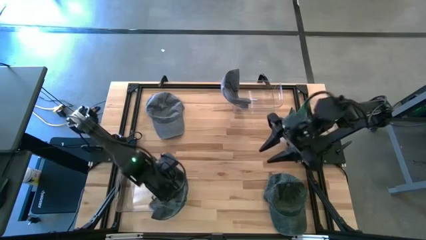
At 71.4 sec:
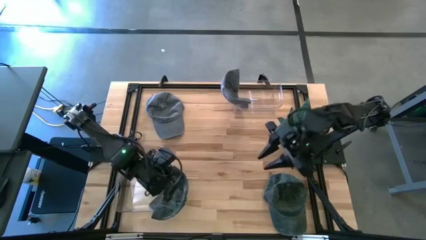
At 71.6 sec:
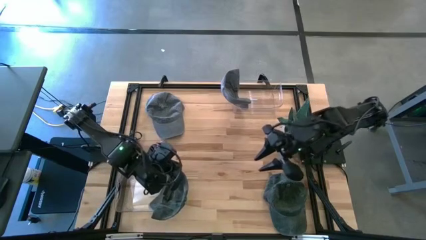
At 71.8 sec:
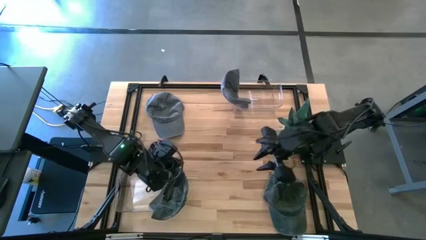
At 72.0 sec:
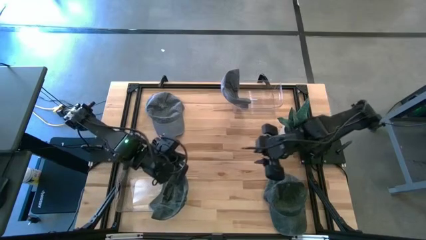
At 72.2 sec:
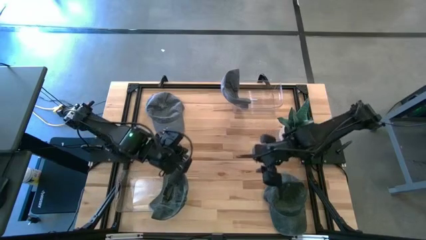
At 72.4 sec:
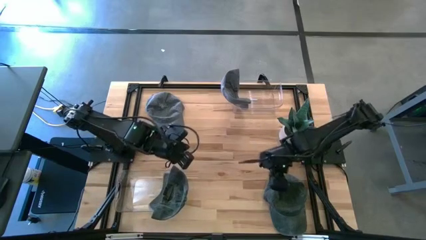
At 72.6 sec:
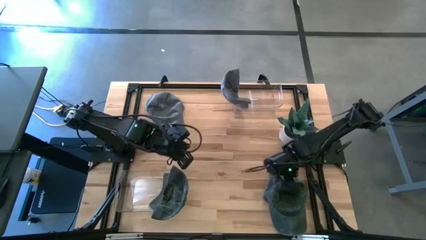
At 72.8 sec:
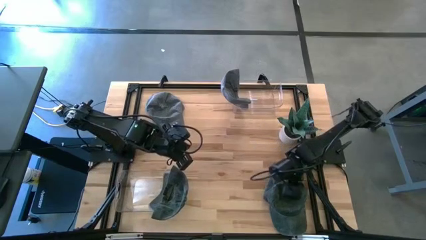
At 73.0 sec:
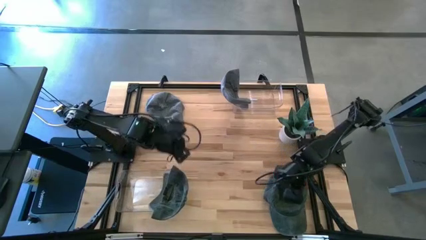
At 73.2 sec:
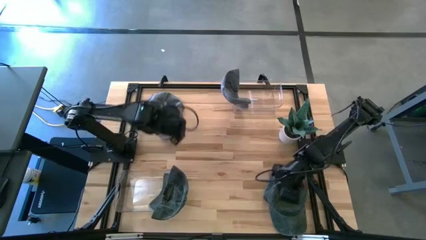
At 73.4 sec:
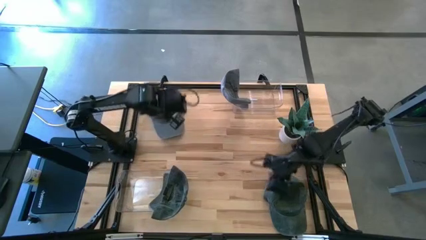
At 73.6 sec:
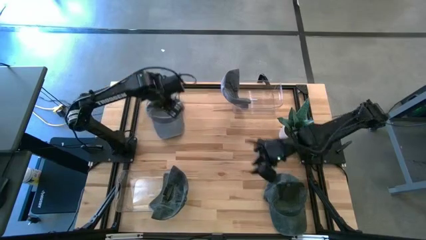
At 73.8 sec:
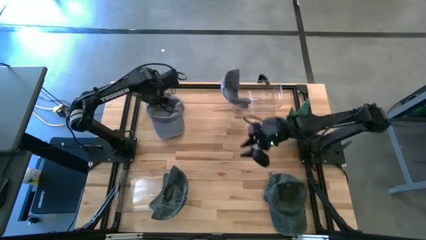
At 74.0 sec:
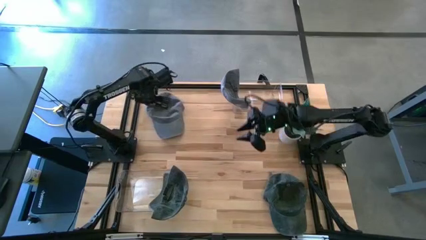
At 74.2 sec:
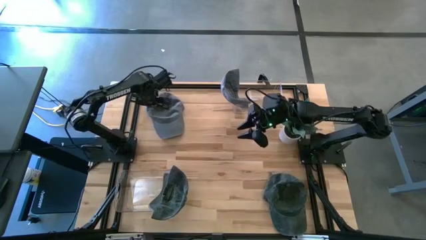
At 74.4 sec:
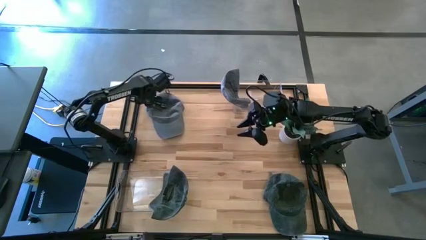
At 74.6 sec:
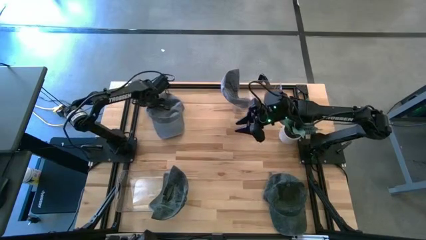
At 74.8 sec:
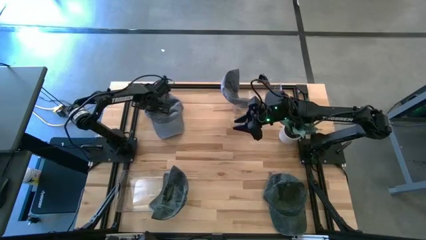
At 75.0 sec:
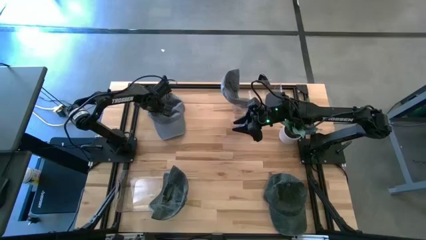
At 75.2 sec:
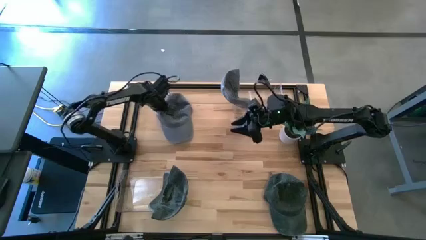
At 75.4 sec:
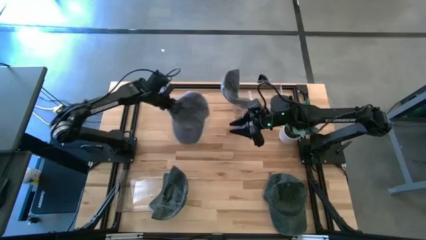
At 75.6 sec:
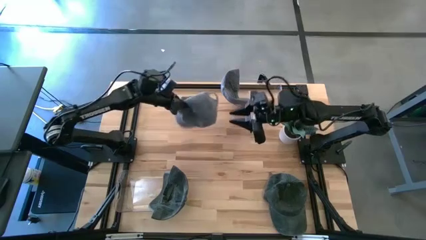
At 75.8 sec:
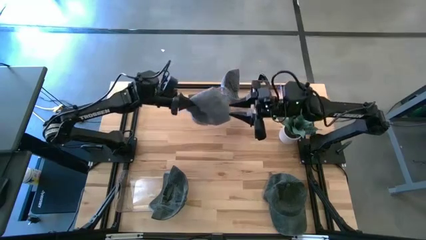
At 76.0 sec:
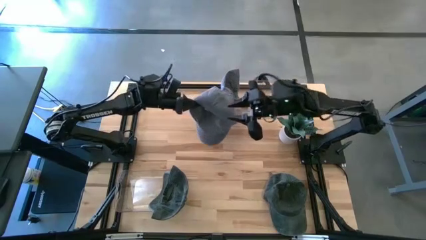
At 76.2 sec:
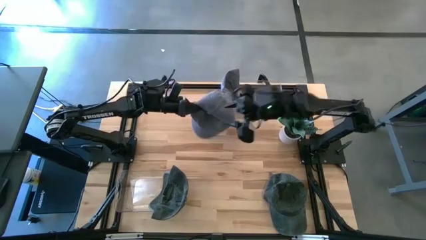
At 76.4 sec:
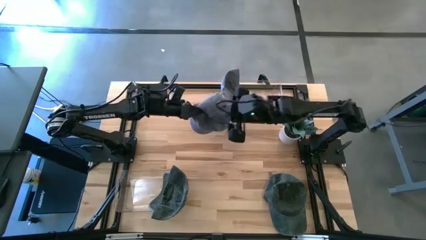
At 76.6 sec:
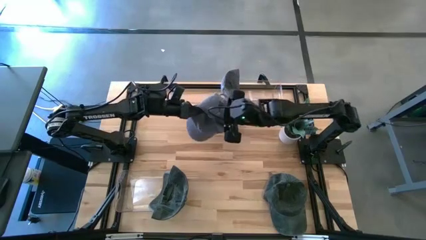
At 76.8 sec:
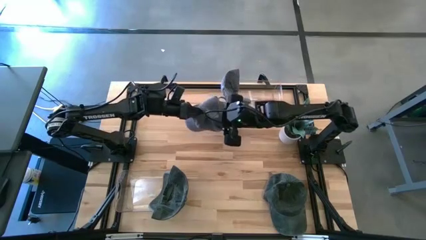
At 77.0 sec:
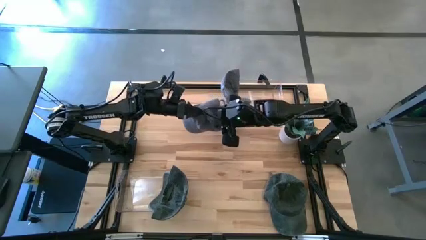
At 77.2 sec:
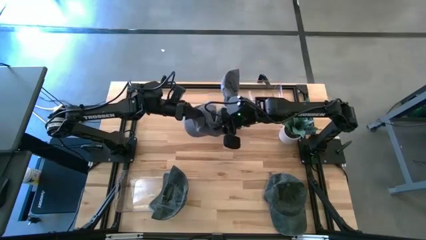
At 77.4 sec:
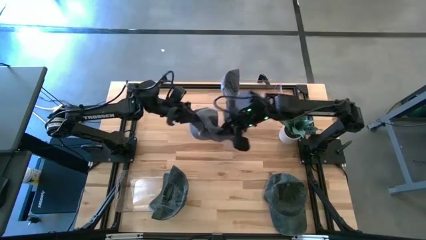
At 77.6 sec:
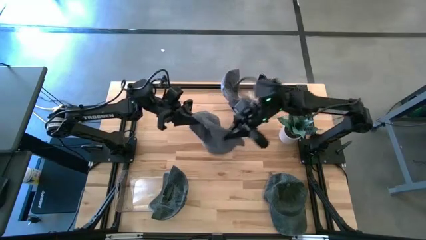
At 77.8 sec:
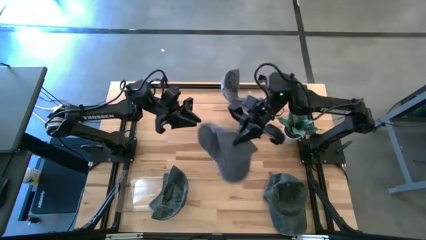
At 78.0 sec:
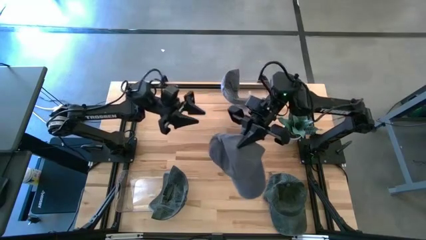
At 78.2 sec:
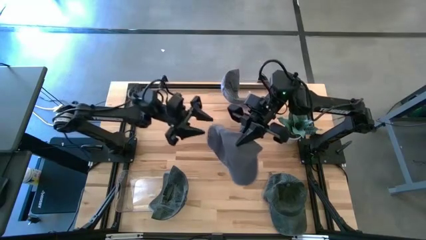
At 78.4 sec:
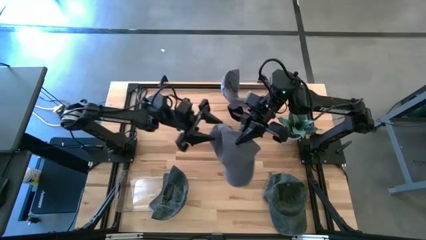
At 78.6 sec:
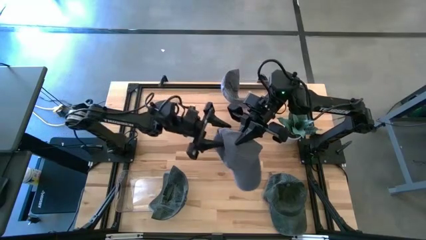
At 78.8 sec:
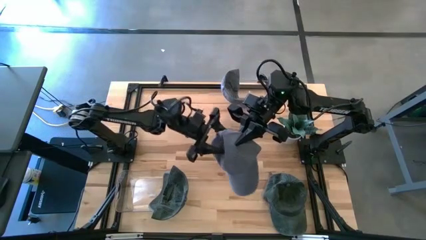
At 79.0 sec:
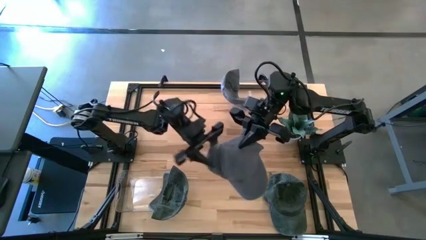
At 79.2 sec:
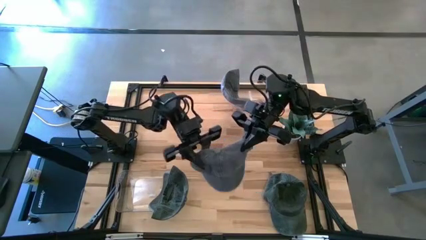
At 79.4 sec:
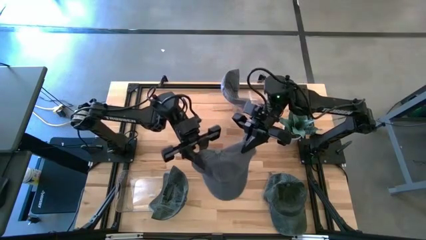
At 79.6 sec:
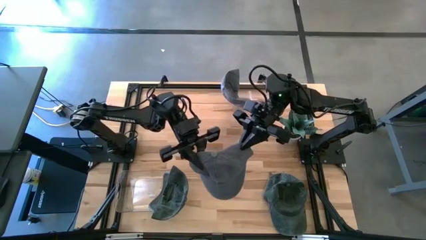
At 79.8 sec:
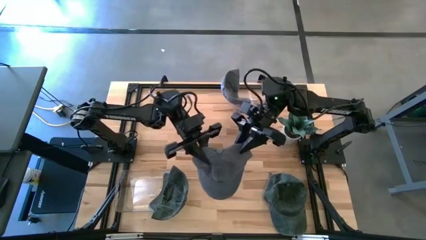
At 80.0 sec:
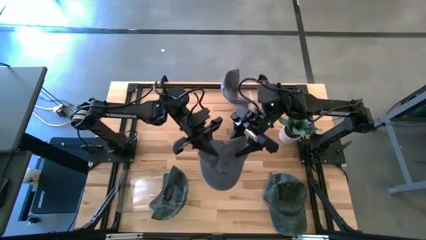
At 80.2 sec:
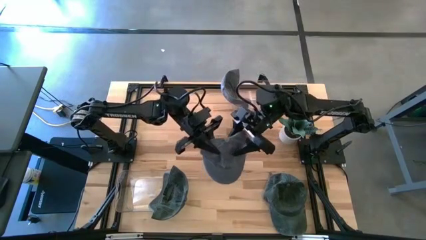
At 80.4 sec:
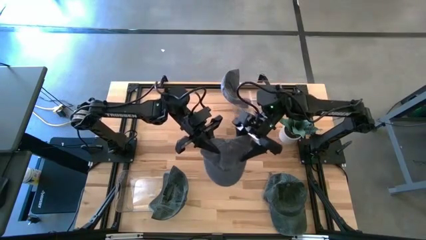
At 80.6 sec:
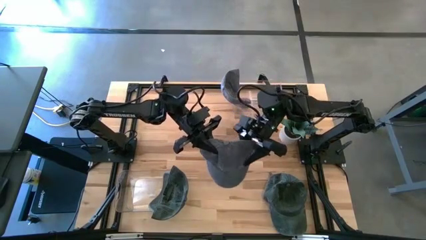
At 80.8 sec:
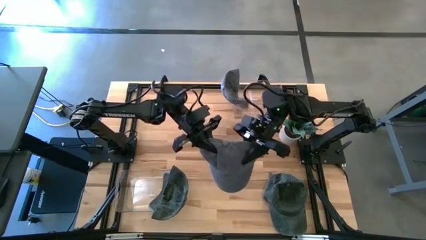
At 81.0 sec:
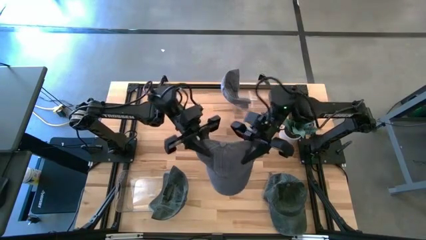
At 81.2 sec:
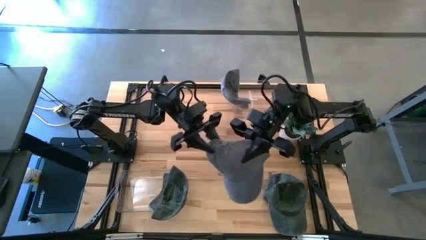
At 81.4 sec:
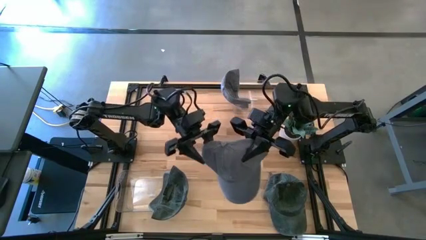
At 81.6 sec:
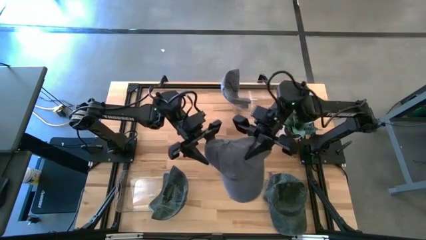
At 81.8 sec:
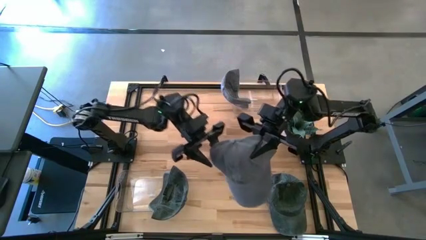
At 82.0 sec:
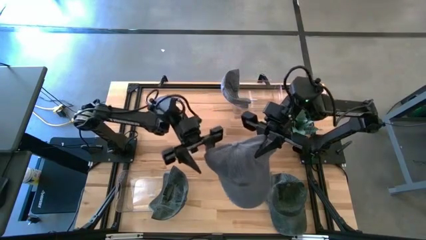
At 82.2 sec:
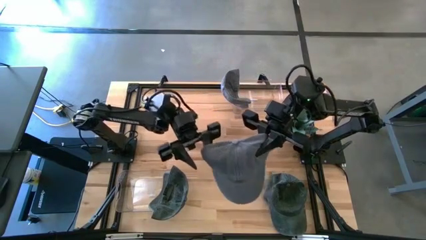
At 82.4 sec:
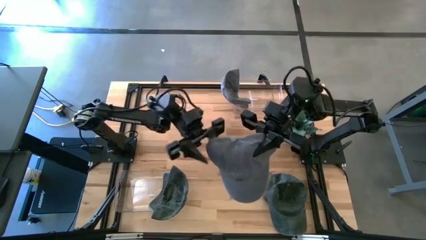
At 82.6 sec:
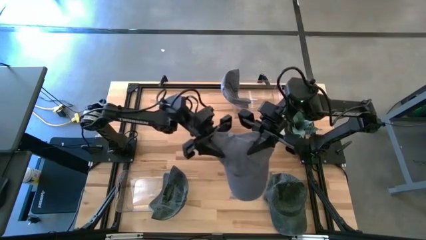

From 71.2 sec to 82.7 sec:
Task: Pick & Place hat
Put the gray cap into the top transparent bin
